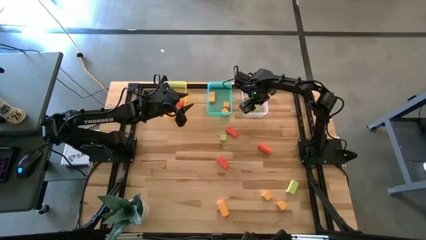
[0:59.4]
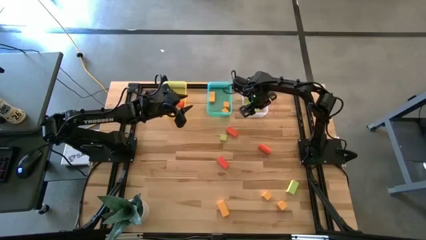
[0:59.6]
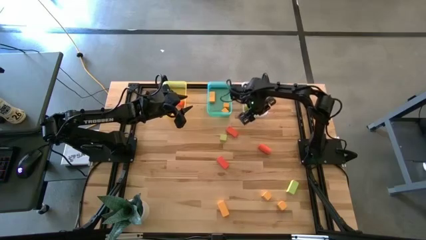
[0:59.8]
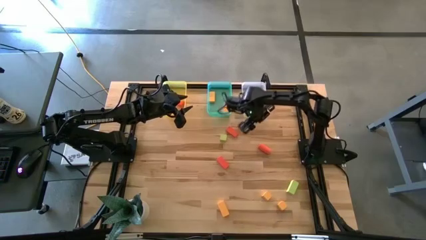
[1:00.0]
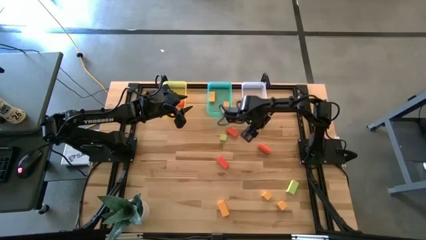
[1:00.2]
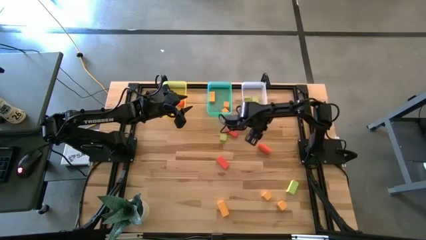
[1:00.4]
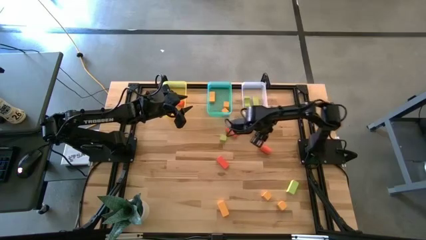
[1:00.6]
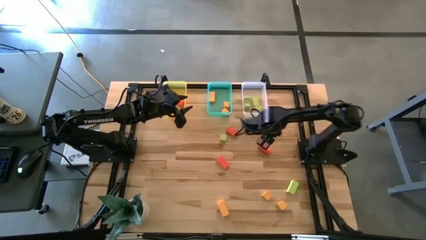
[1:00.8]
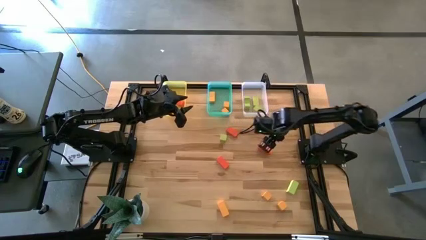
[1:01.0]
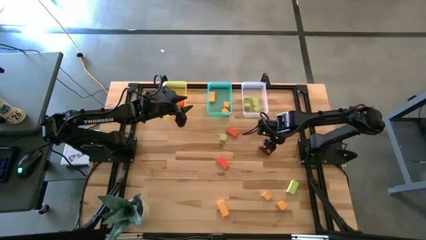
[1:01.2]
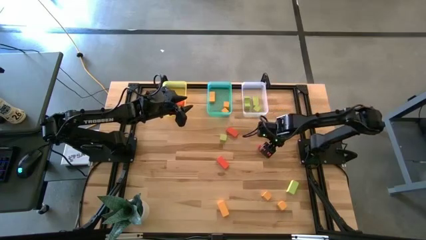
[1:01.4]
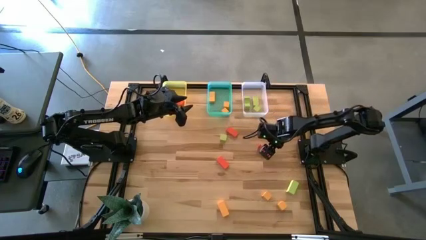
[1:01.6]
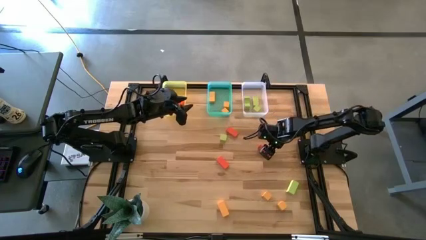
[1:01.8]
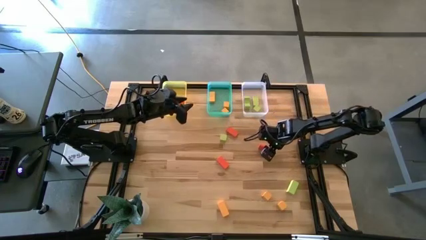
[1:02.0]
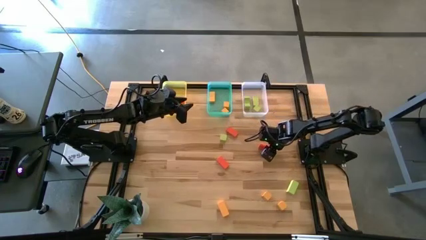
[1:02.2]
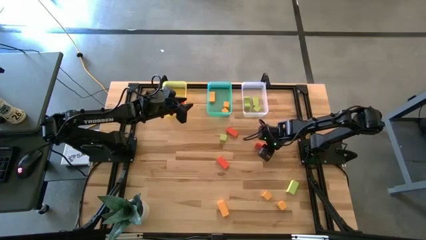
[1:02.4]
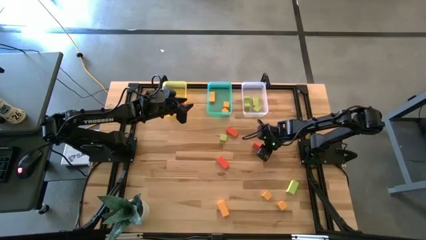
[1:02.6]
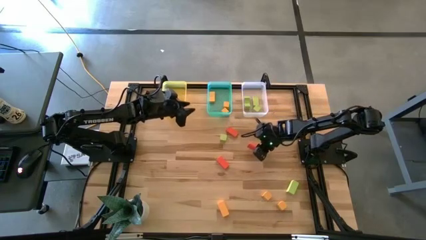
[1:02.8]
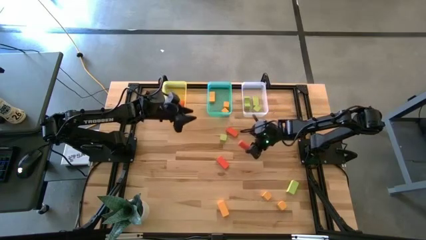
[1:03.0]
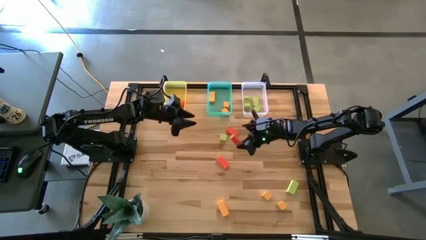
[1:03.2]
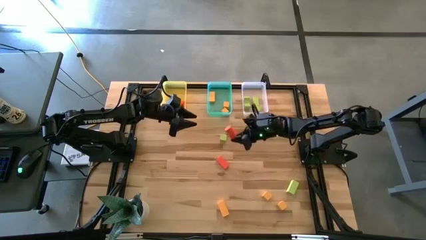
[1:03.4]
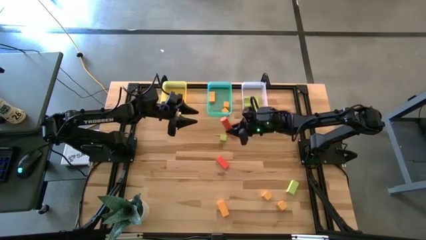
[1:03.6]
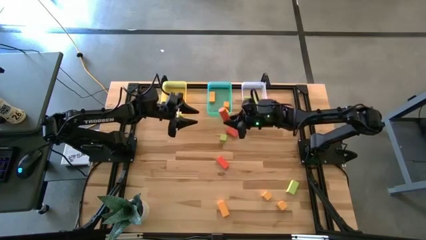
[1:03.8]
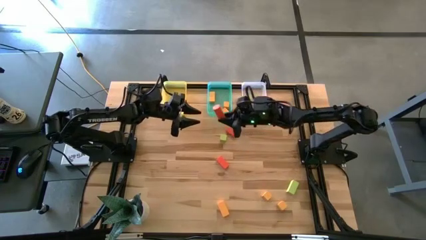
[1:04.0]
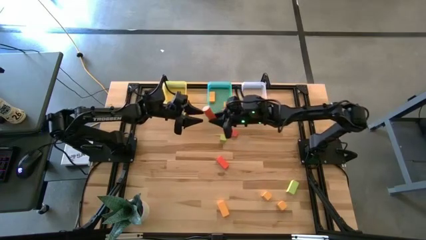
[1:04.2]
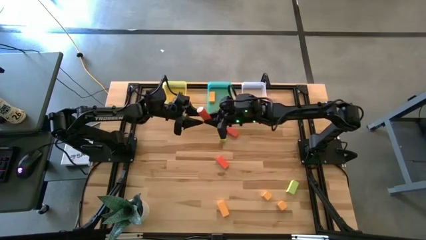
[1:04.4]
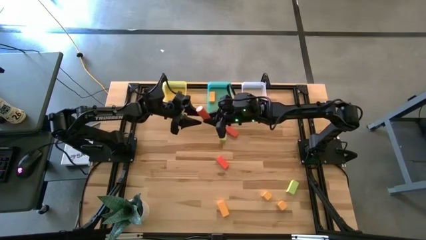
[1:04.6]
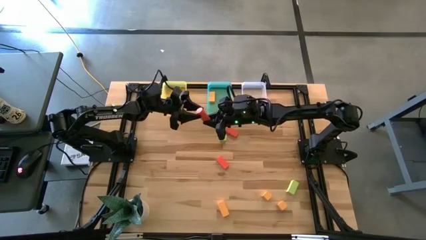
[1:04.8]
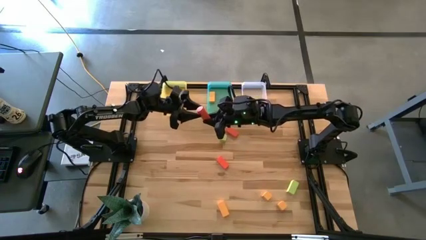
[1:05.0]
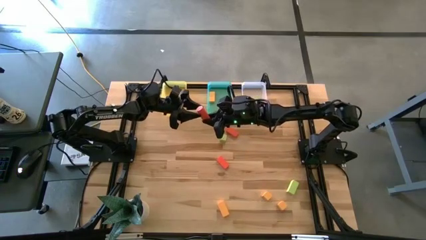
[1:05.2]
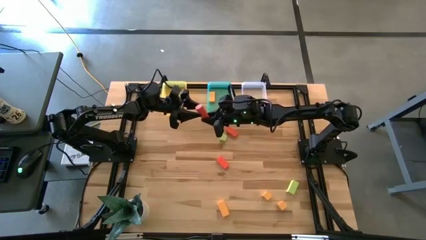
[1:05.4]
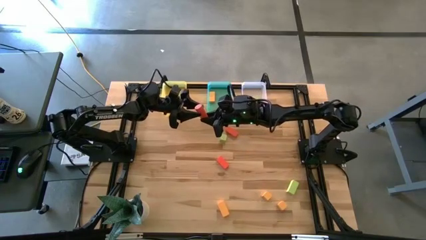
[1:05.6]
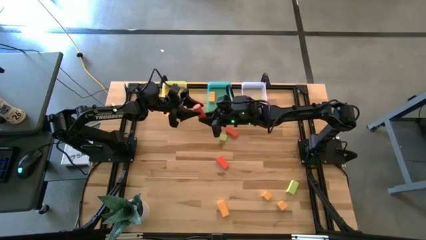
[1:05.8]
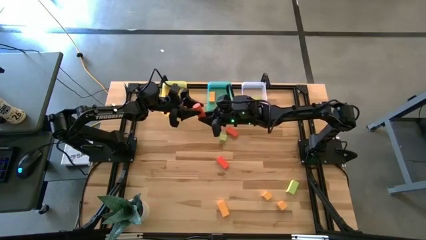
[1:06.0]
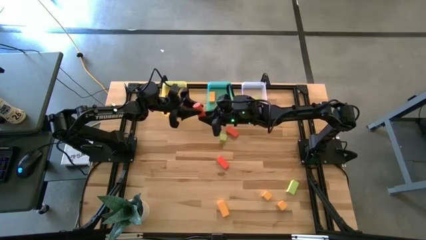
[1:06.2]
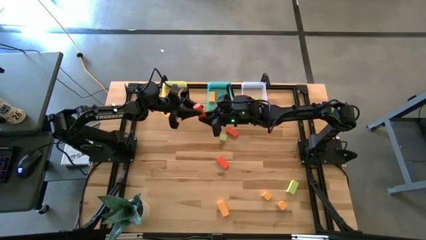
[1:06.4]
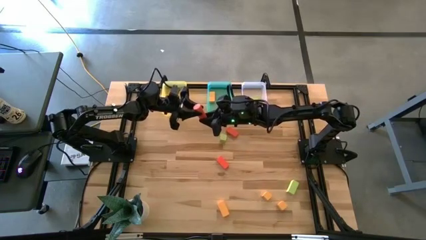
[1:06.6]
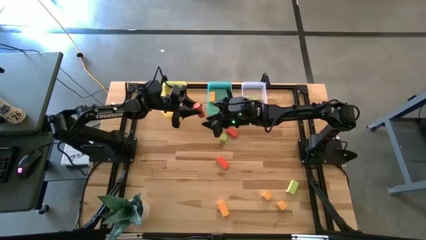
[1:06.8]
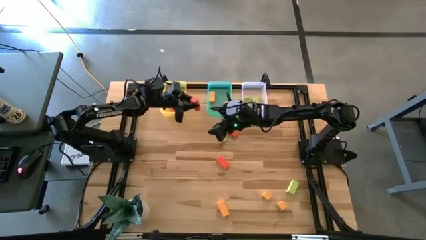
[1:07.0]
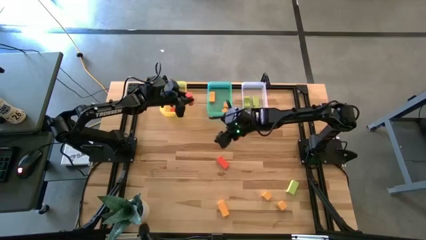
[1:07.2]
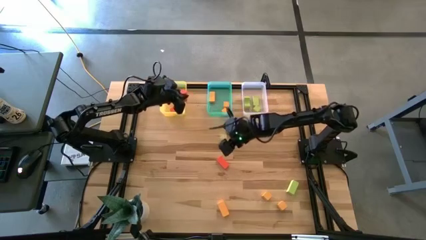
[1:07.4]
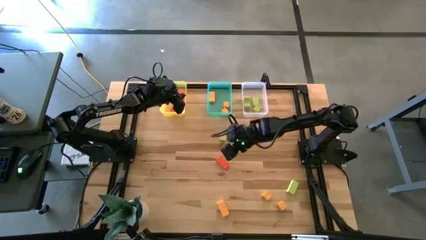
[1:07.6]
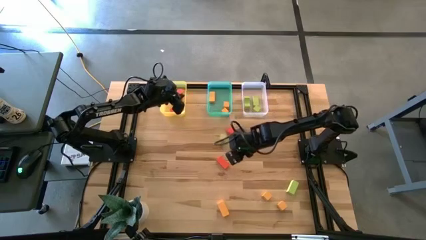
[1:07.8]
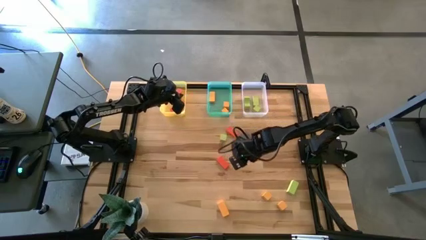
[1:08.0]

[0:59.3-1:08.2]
Task: Sort & place blocks by color
Put the orange block into the yellow bin

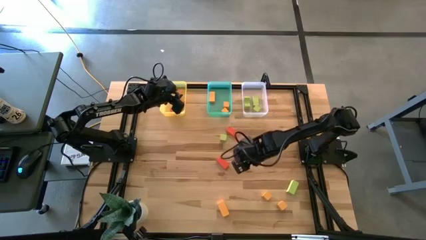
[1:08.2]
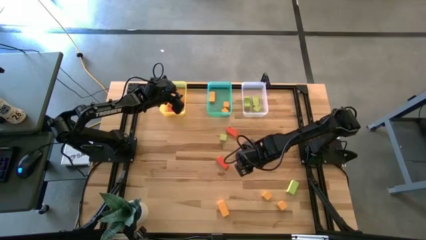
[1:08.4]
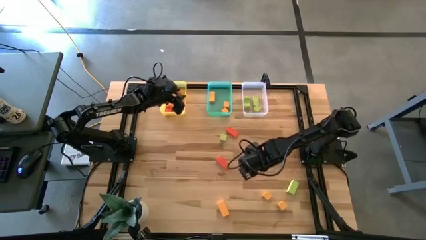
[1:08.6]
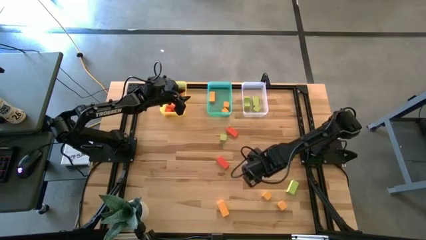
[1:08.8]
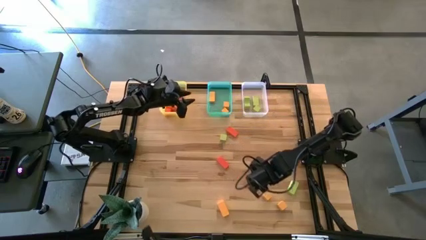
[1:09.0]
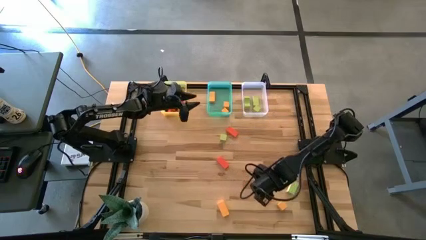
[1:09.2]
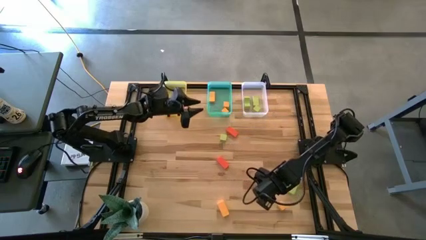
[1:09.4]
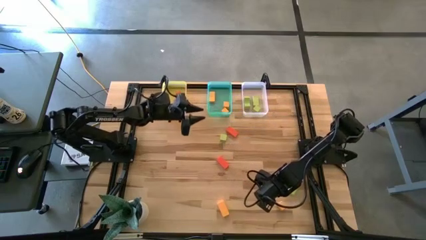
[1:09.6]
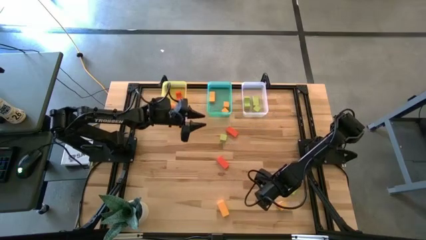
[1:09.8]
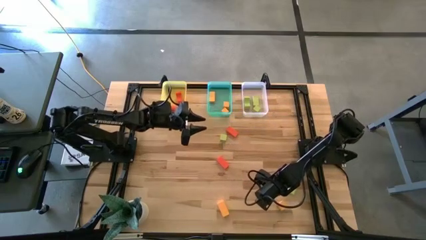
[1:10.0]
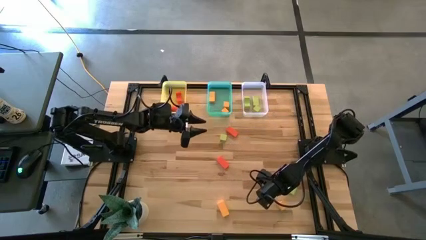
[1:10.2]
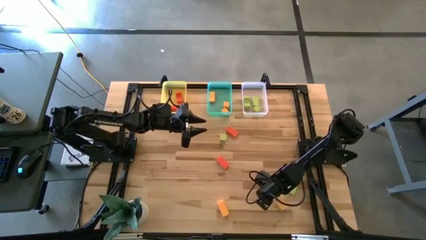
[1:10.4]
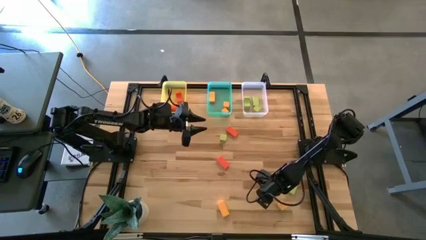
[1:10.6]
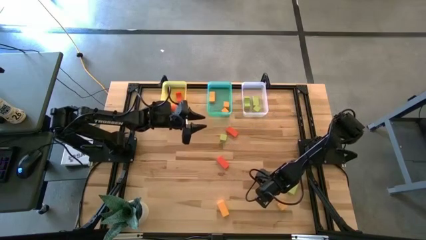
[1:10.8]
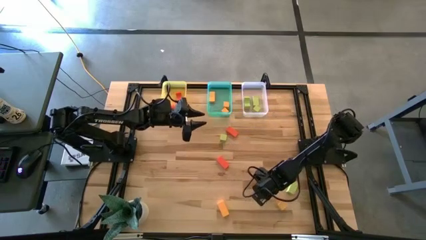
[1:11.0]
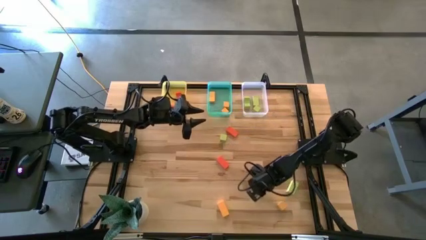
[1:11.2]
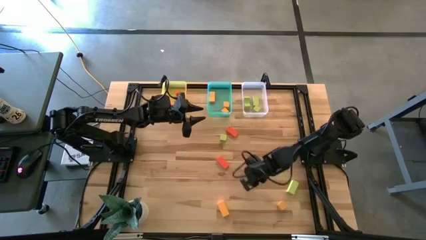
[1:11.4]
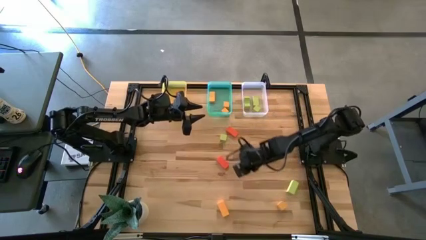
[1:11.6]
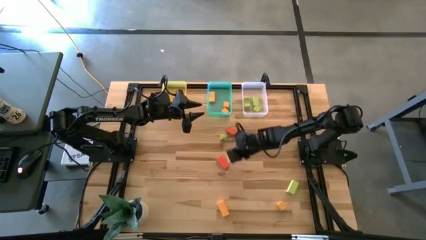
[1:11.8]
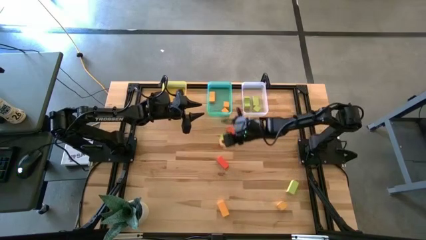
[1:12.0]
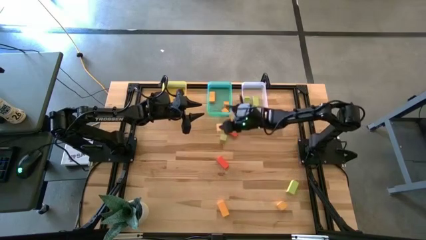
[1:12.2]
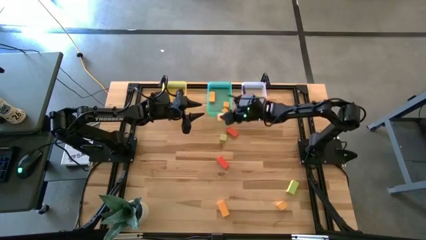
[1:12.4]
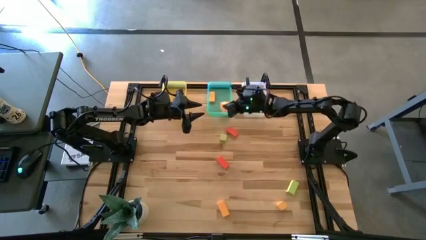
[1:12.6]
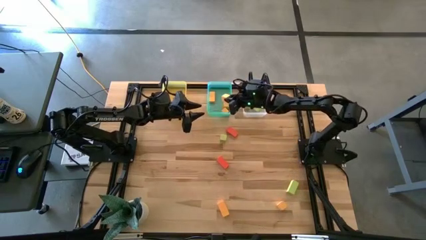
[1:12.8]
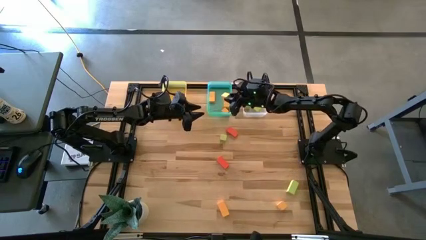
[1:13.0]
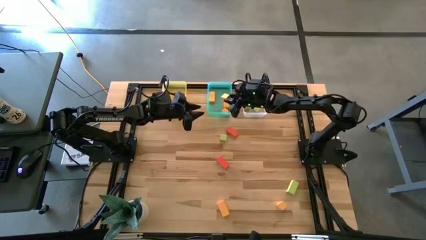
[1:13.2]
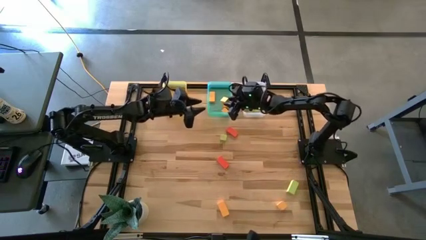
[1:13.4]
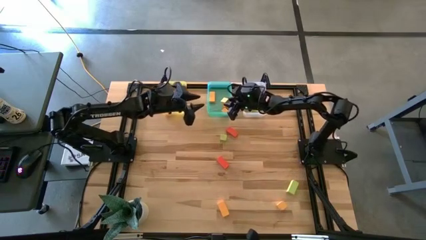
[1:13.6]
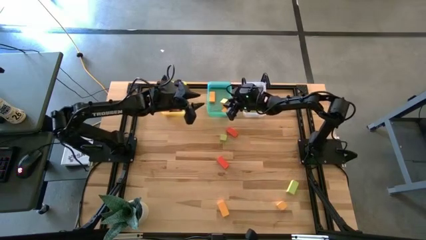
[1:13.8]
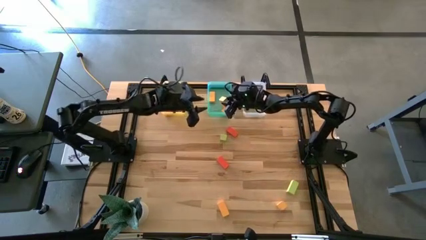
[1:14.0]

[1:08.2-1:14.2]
Put the yellow block into the green bin
